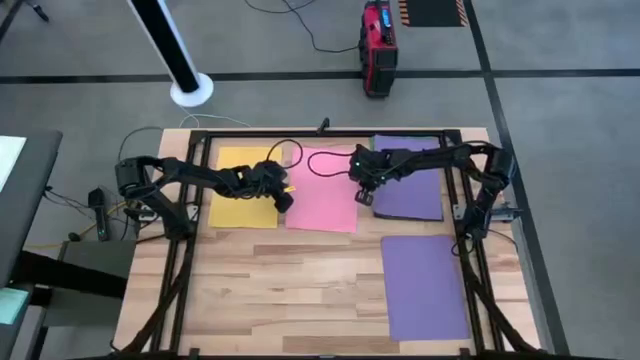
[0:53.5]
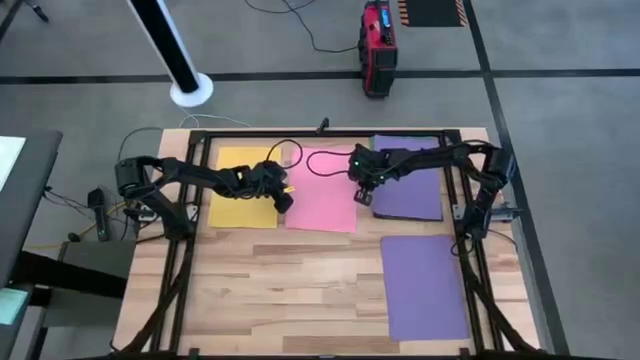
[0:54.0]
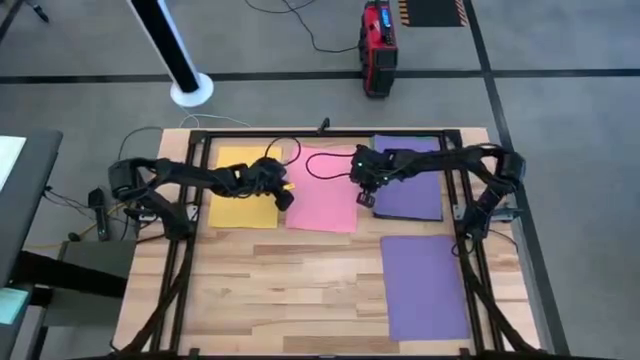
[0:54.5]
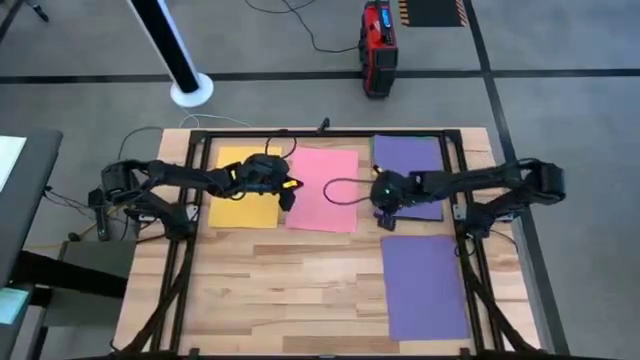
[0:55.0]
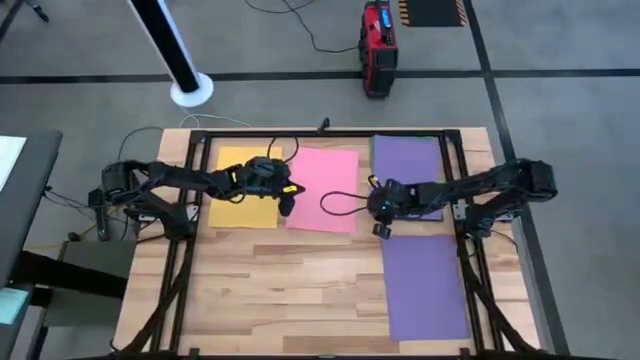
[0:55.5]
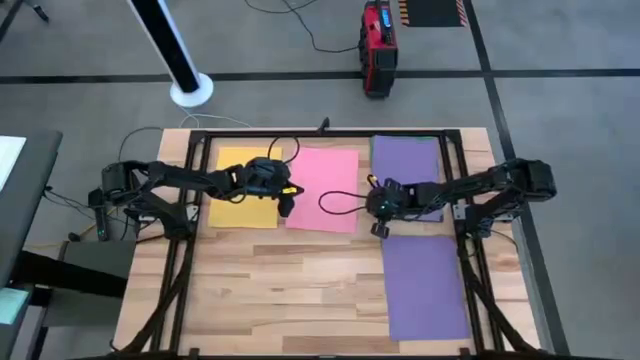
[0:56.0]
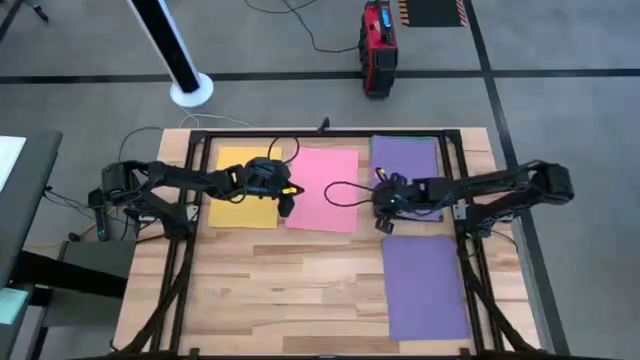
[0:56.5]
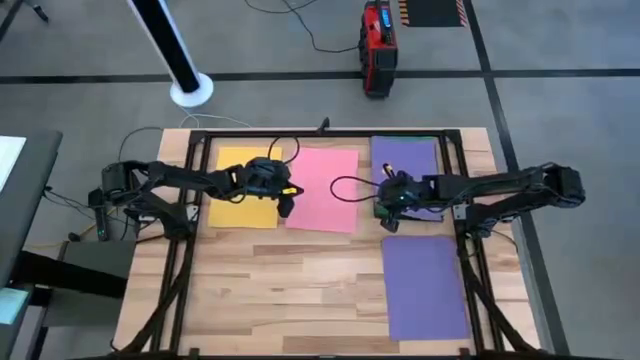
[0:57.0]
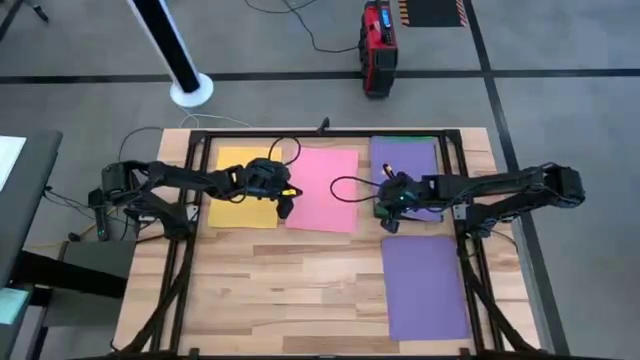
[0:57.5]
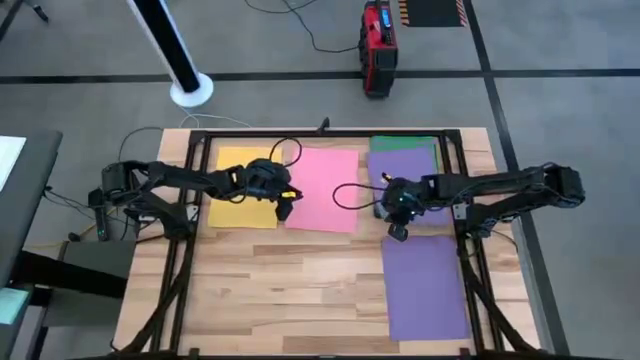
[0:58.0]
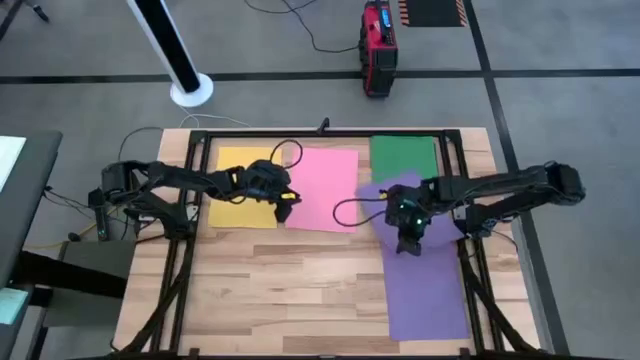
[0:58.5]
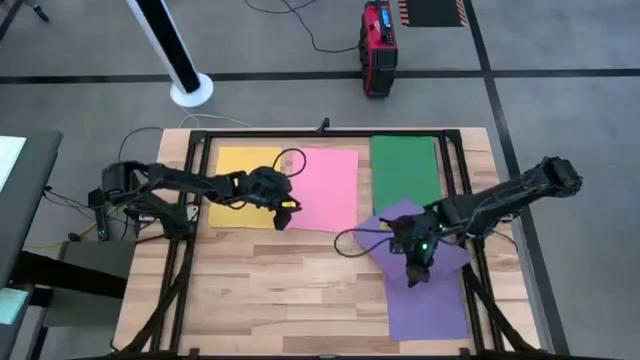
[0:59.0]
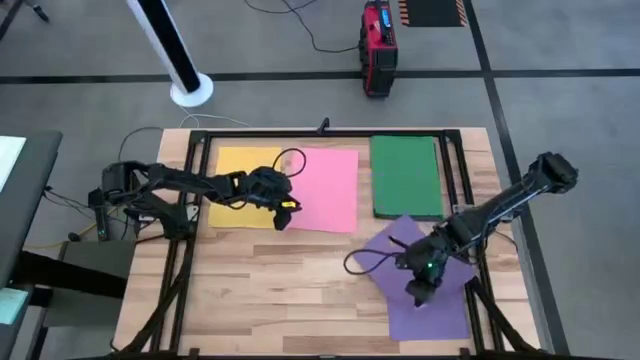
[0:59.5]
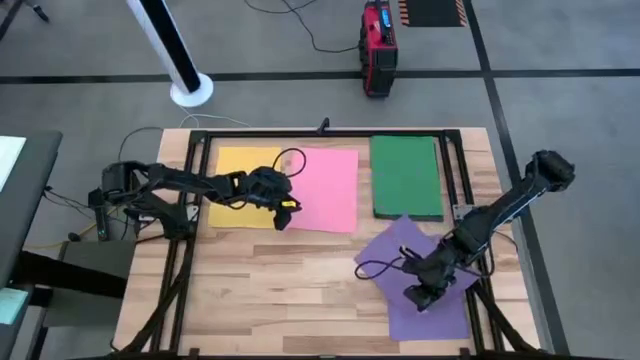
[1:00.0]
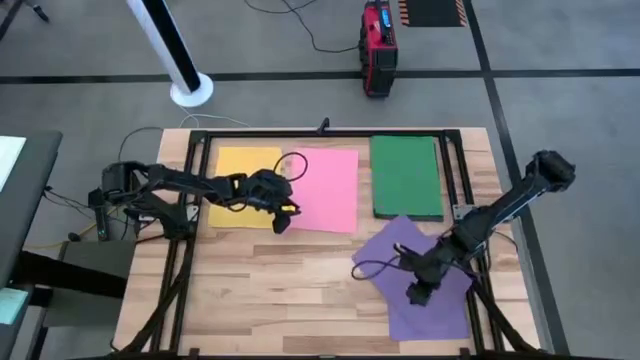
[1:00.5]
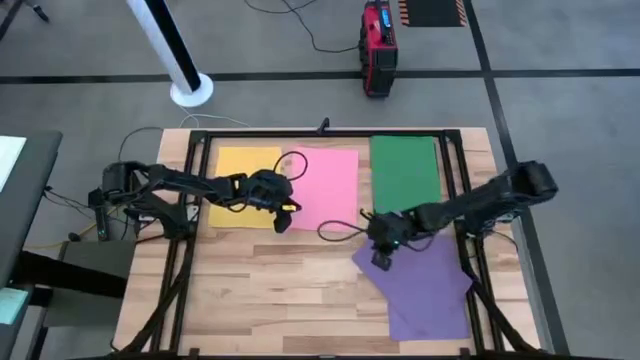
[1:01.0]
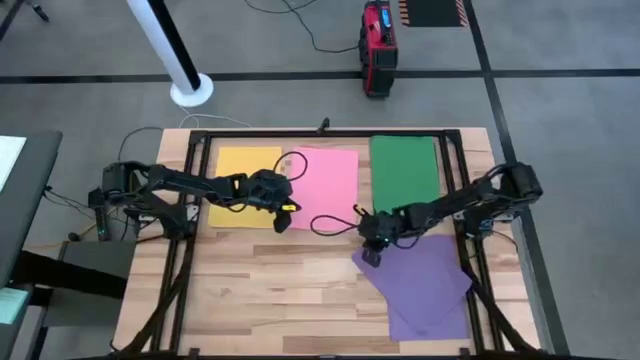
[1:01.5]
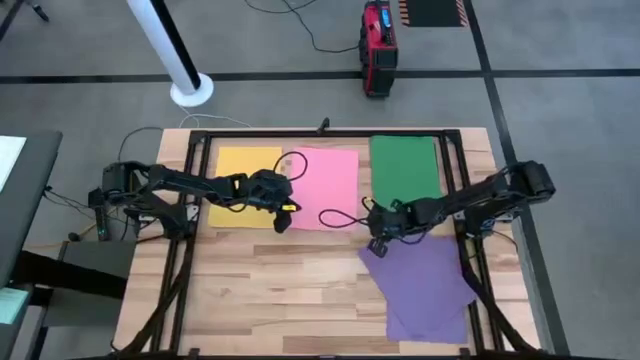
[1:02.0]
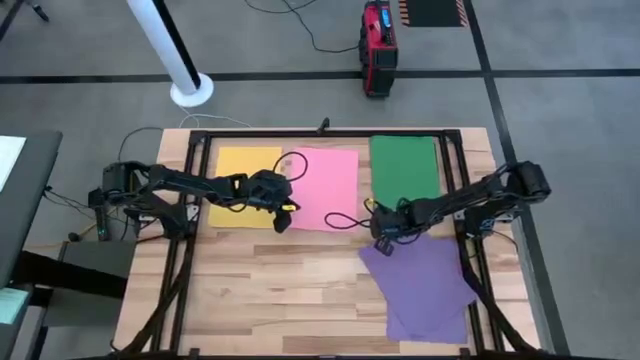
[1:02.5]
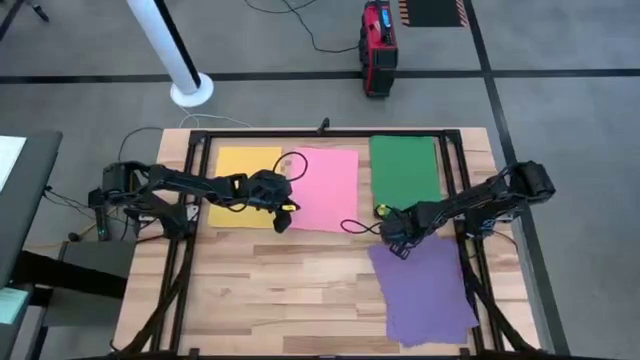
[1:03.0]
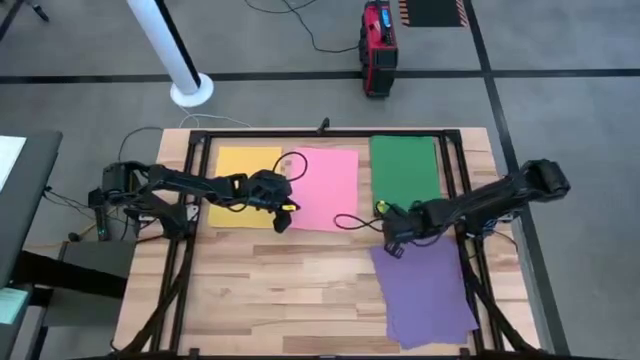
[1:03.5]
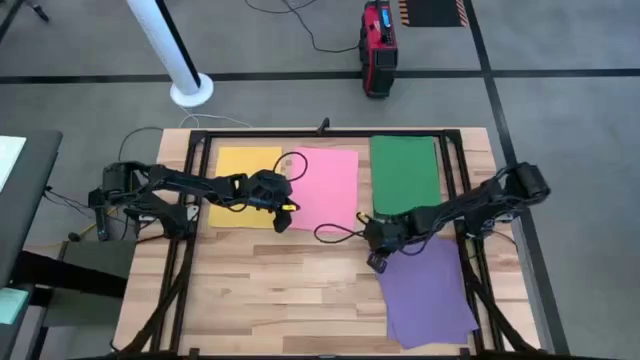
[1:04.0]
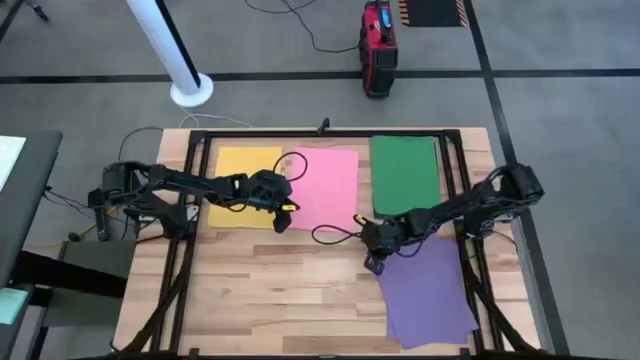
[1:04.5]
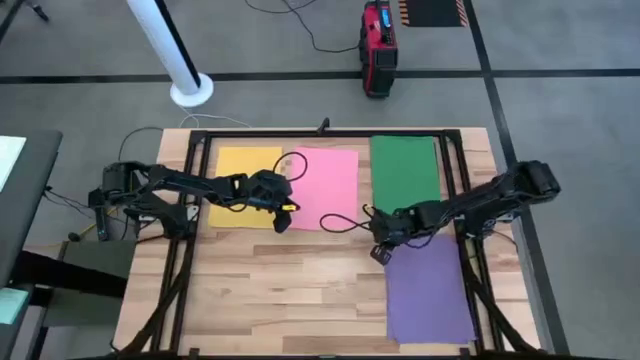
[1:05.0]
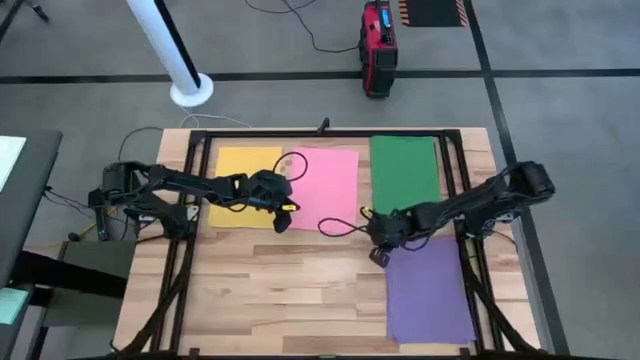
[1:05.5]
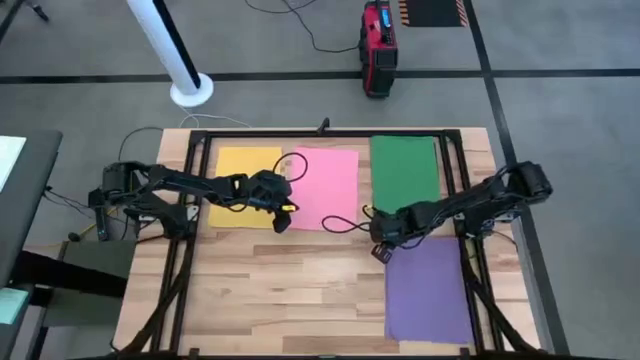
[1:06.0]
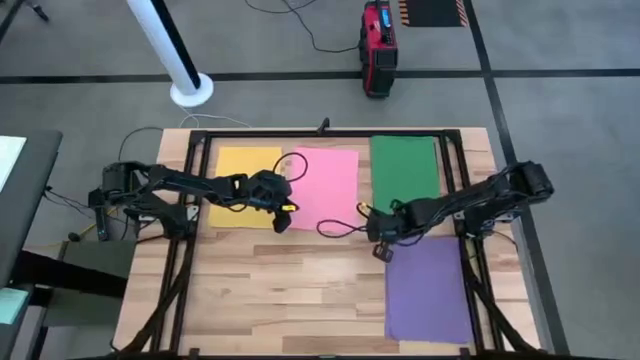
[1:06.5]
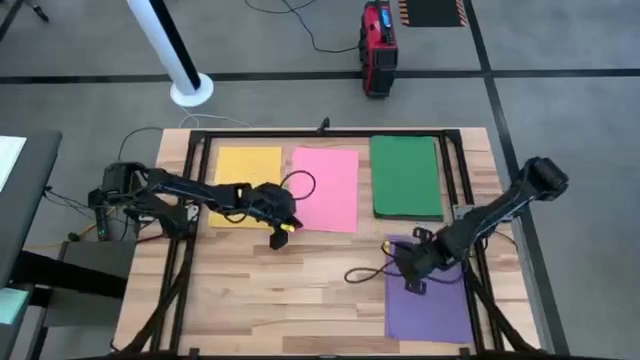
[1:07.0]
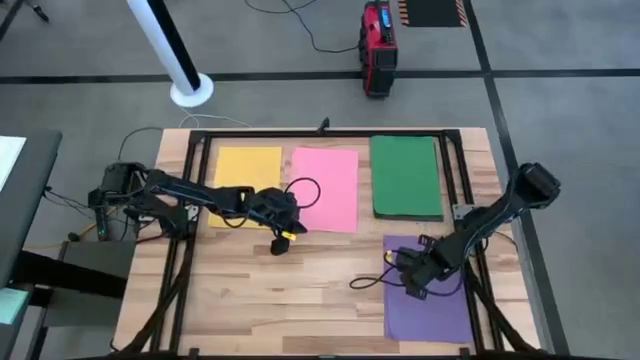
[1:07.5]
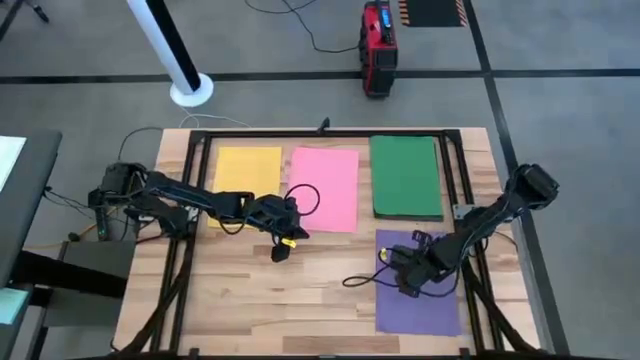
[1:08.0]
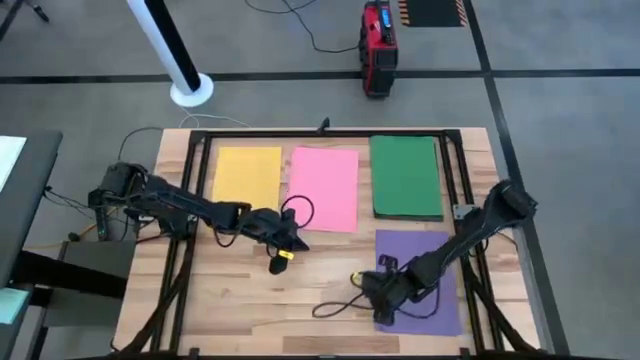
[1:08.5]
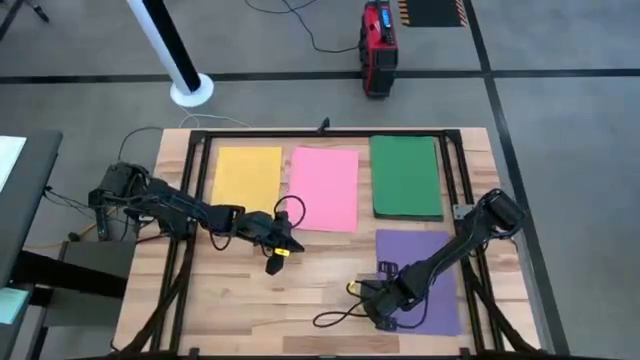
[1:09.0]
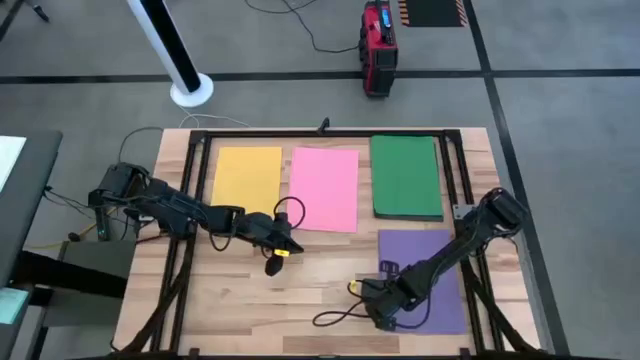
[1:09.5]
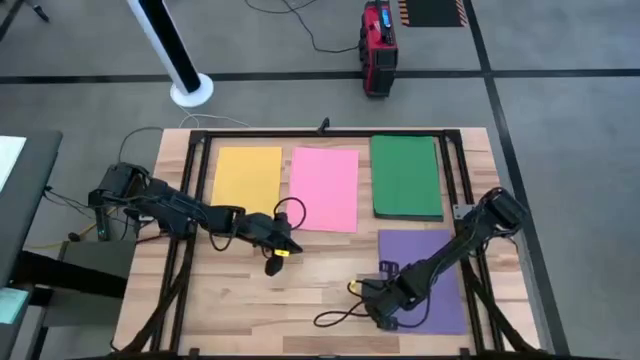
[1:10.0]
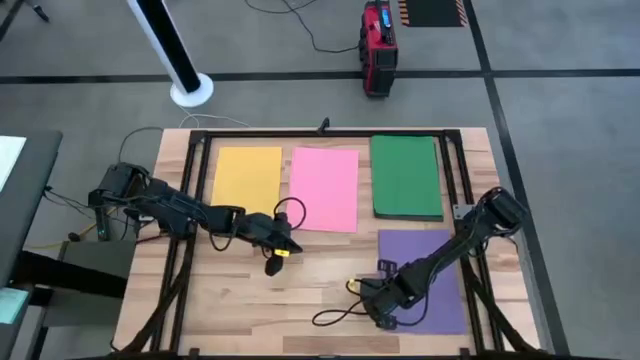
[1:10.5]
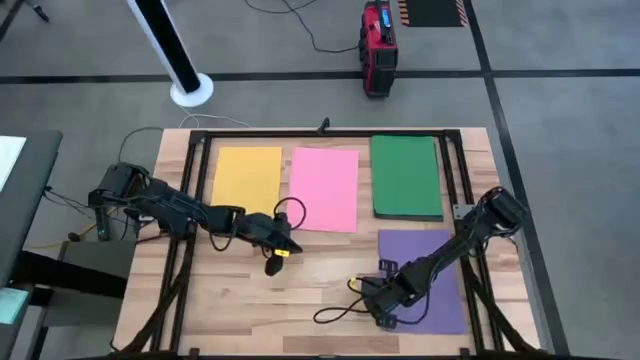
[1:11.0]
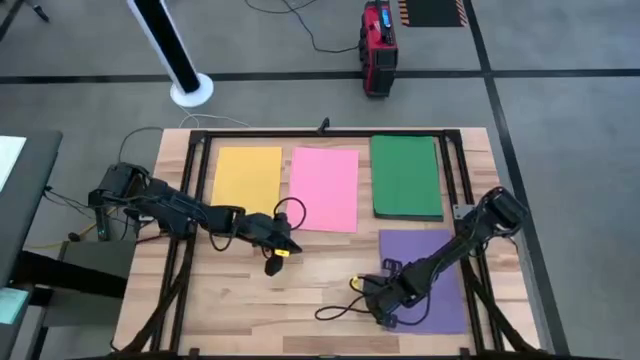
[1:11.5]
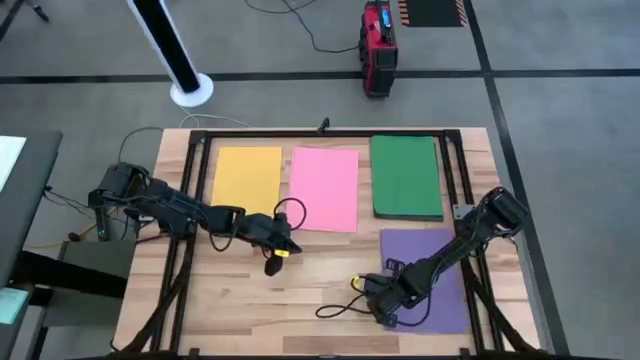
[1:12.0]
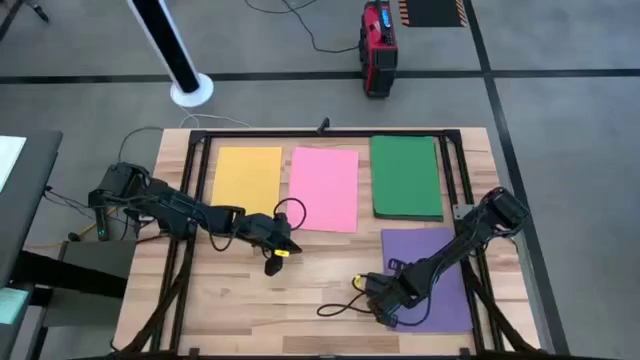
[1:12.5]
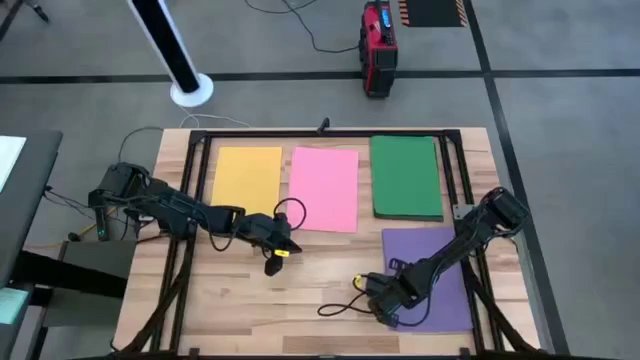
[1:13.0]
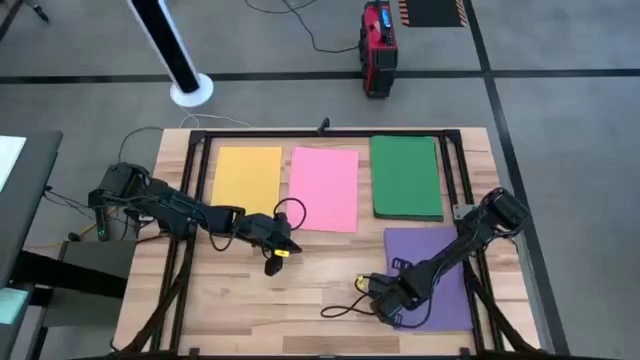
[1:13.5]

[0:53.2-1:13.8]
Task: Organize paper
Stack the top violet colored paper on top of the bottom violet colored paper

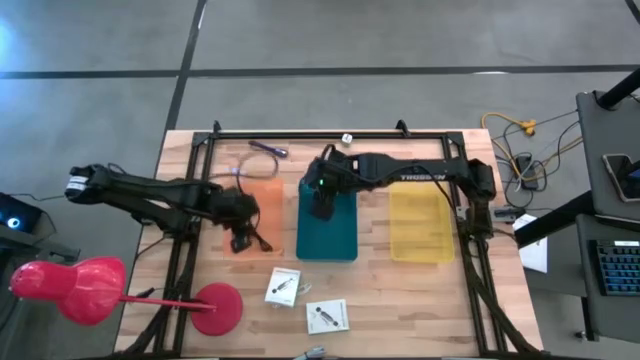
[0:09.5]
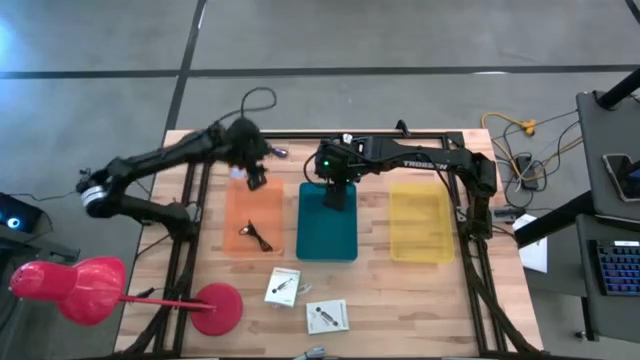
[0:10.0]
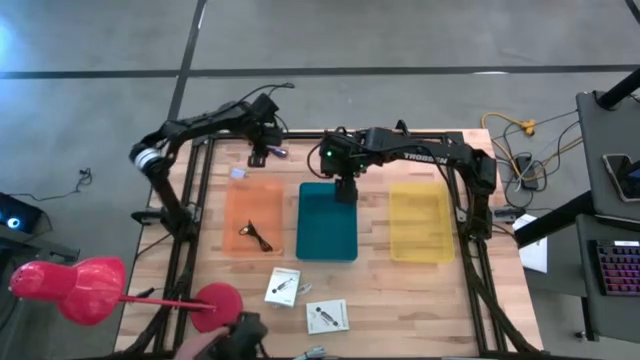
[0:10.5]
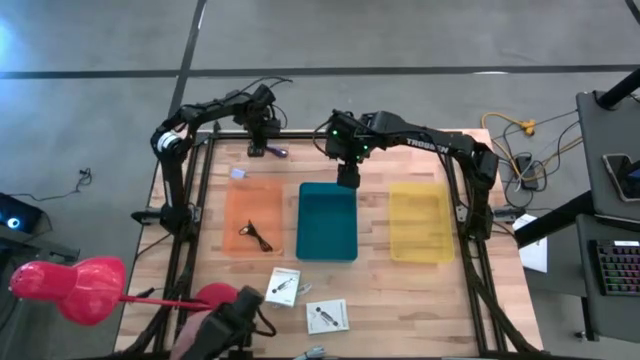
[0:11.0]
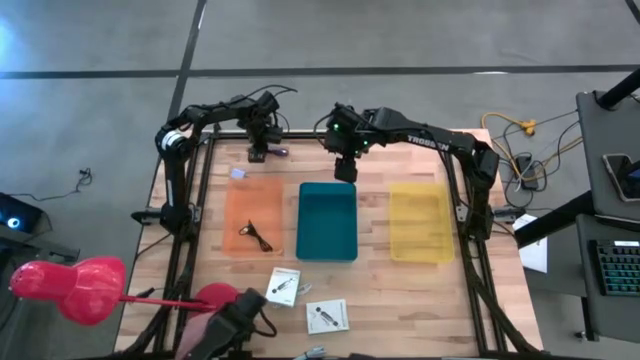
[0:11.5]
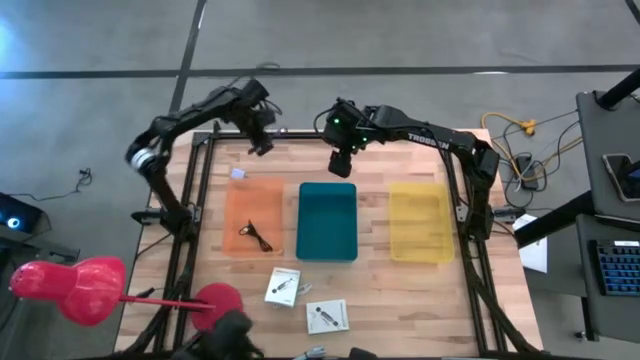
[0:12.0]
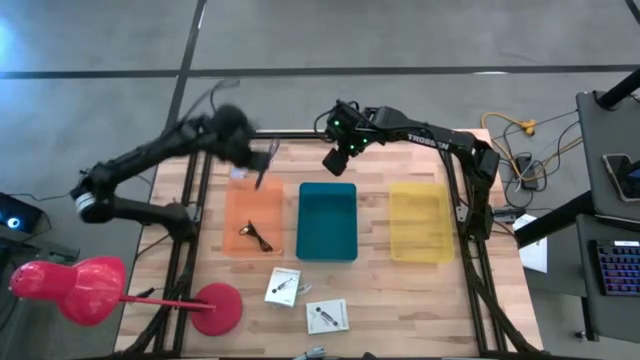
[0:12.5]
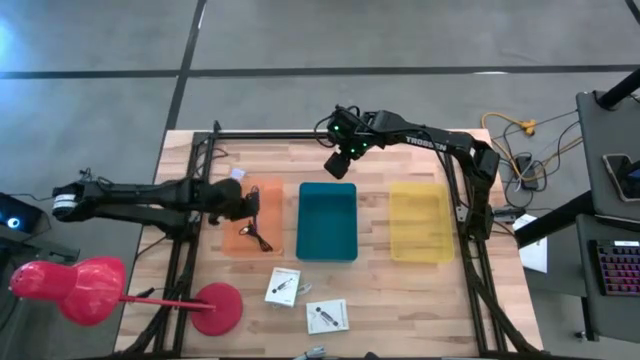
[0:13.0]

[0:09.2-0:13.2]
Task: Pick and place items into bin
Put the blue USB cable wire into the orange bin
